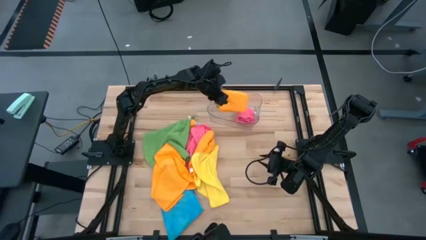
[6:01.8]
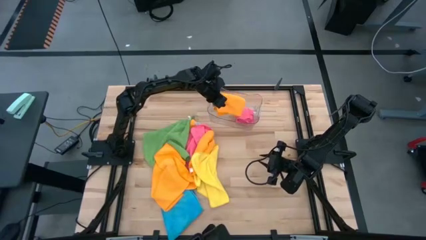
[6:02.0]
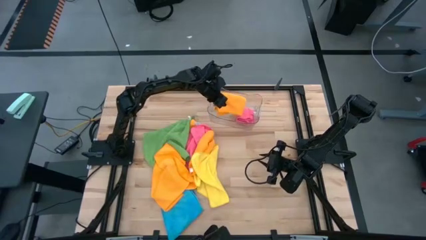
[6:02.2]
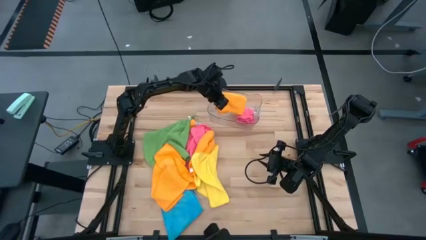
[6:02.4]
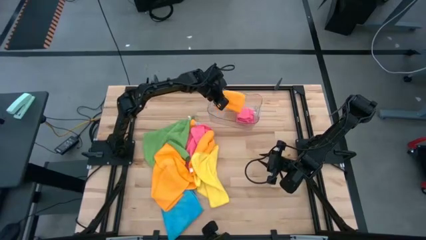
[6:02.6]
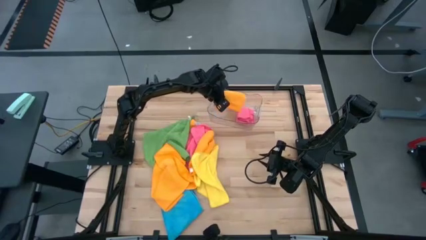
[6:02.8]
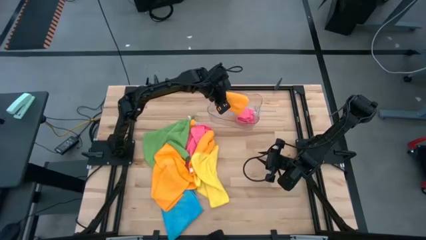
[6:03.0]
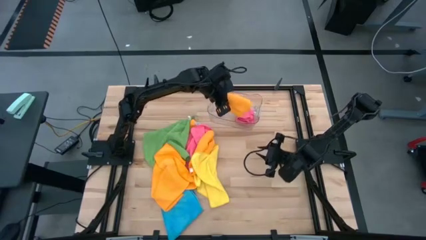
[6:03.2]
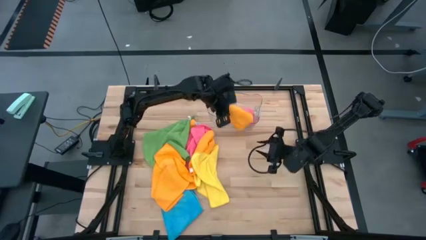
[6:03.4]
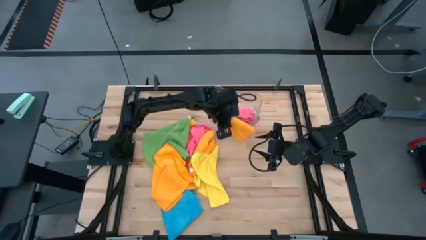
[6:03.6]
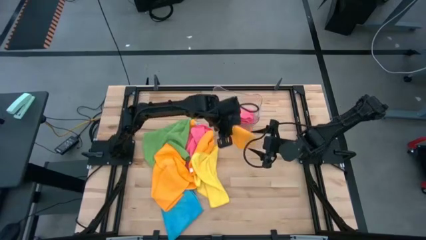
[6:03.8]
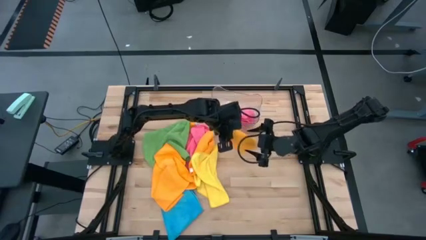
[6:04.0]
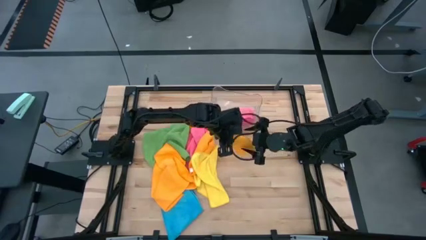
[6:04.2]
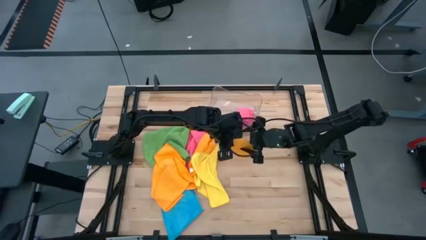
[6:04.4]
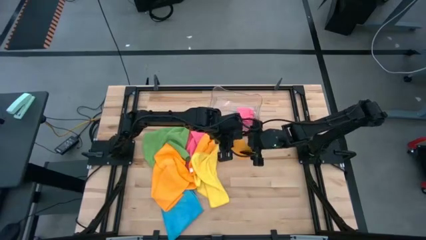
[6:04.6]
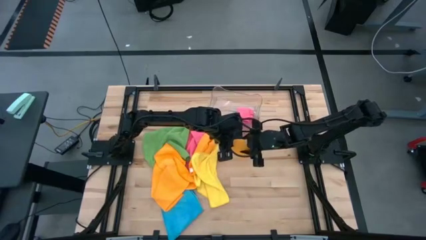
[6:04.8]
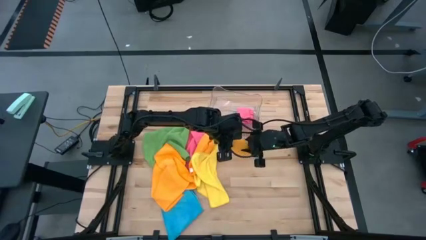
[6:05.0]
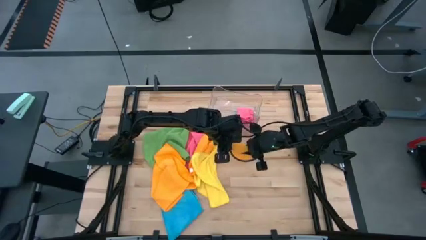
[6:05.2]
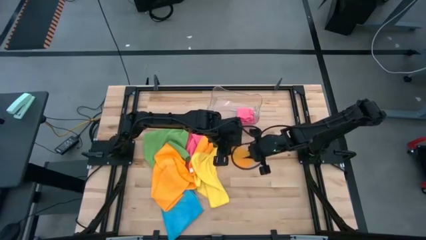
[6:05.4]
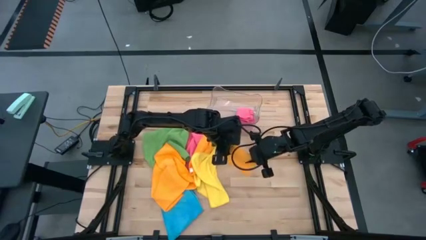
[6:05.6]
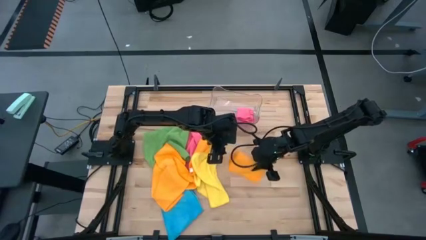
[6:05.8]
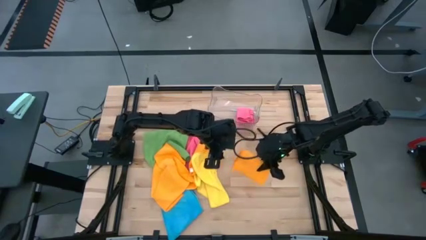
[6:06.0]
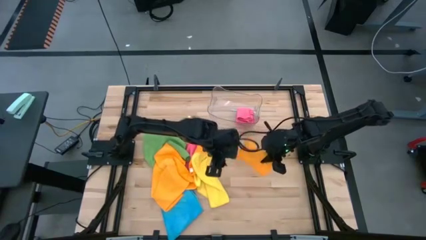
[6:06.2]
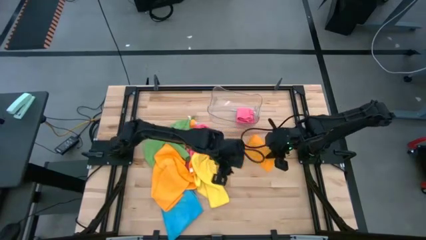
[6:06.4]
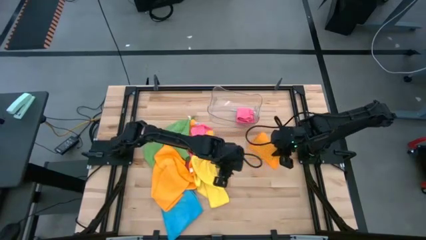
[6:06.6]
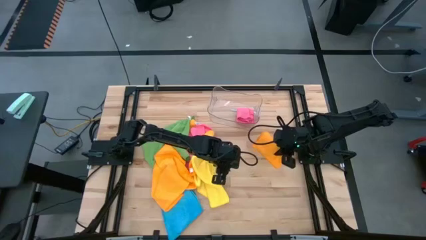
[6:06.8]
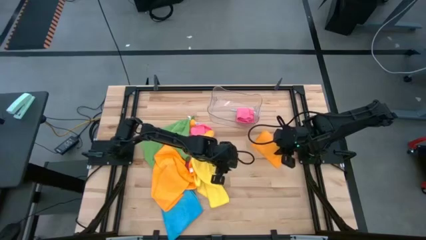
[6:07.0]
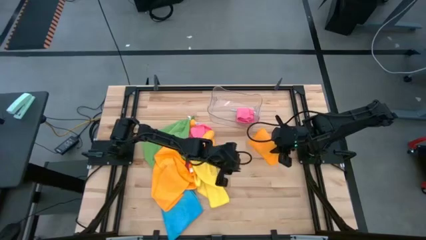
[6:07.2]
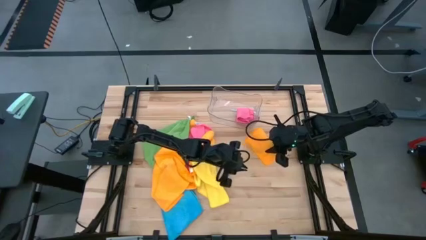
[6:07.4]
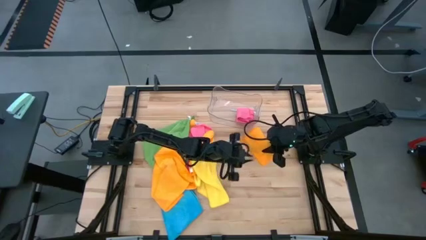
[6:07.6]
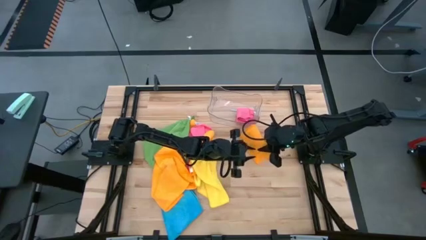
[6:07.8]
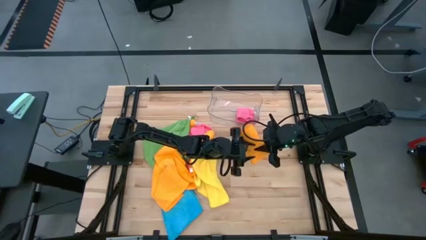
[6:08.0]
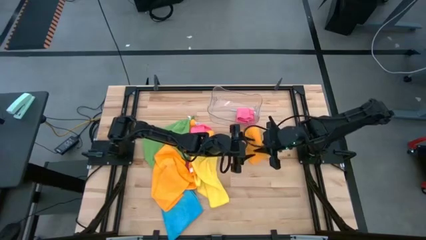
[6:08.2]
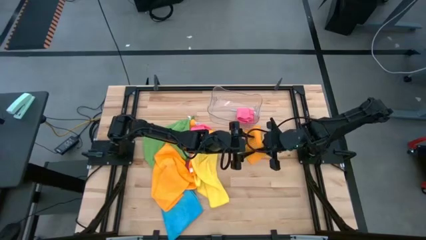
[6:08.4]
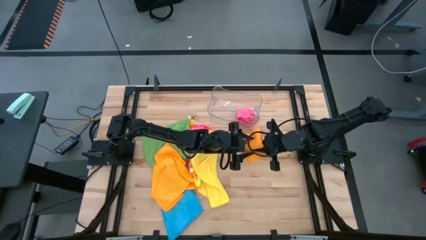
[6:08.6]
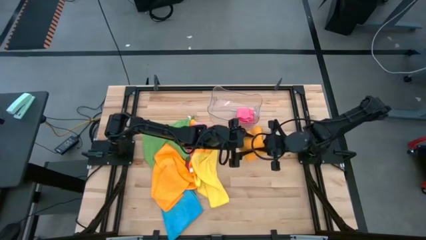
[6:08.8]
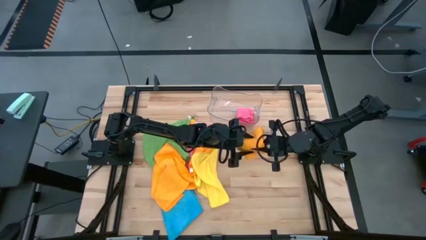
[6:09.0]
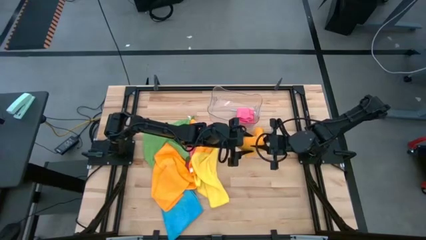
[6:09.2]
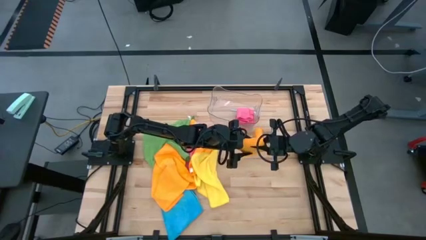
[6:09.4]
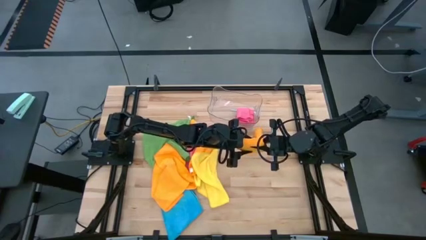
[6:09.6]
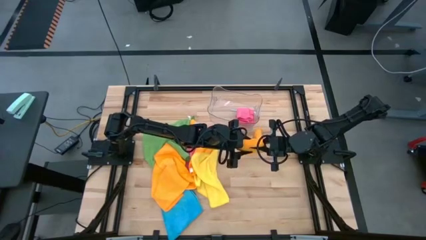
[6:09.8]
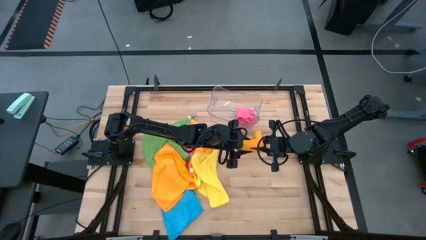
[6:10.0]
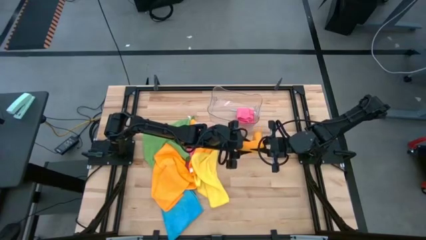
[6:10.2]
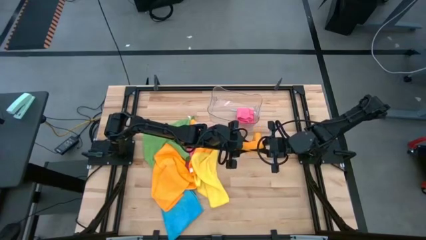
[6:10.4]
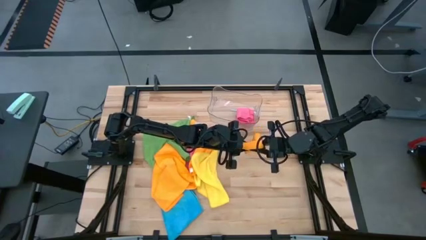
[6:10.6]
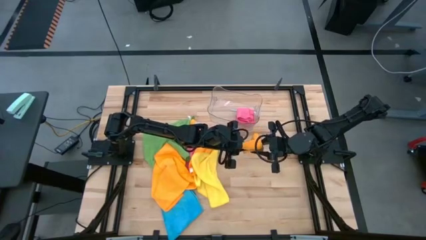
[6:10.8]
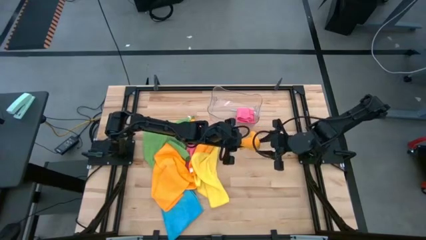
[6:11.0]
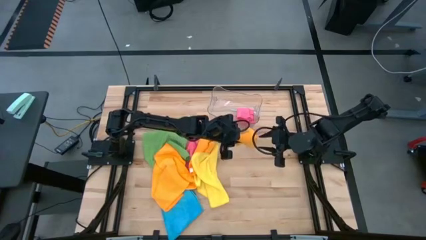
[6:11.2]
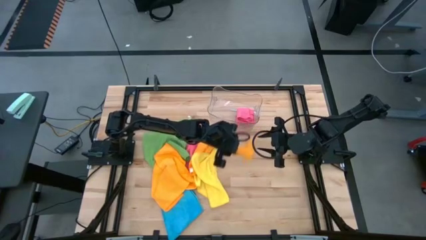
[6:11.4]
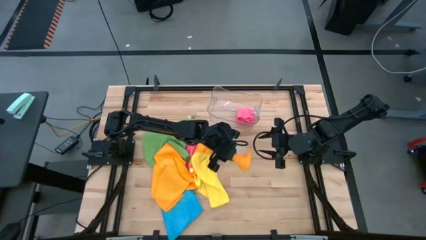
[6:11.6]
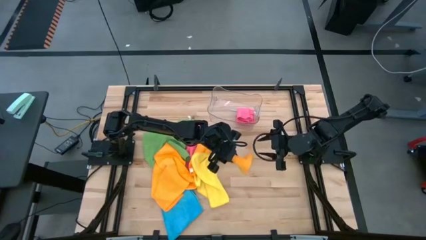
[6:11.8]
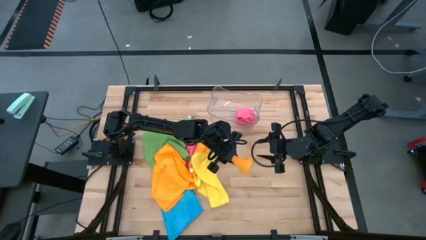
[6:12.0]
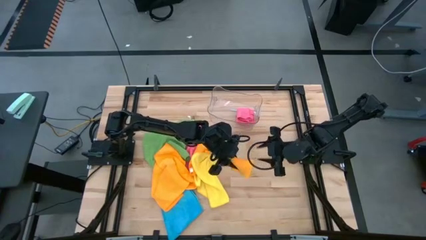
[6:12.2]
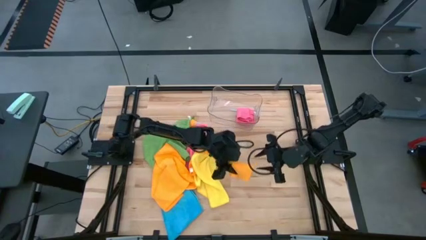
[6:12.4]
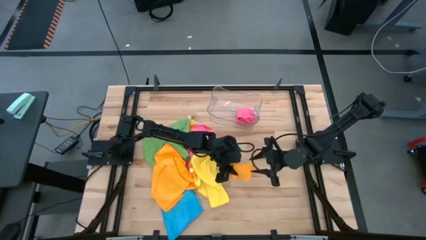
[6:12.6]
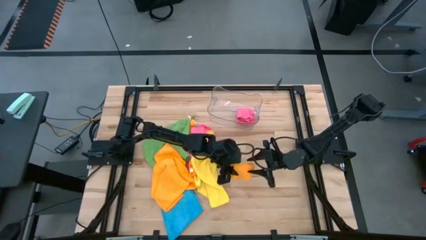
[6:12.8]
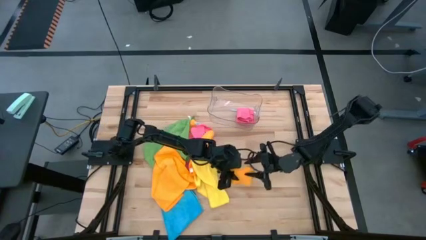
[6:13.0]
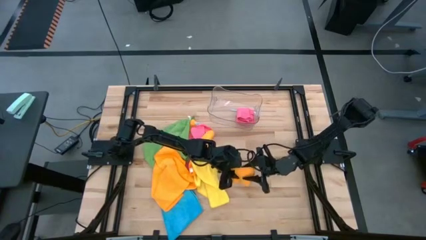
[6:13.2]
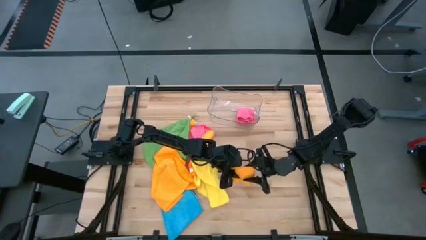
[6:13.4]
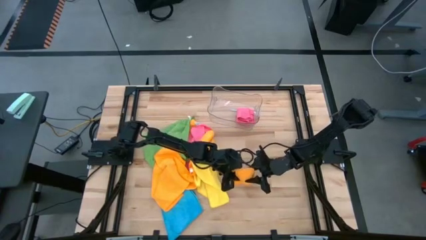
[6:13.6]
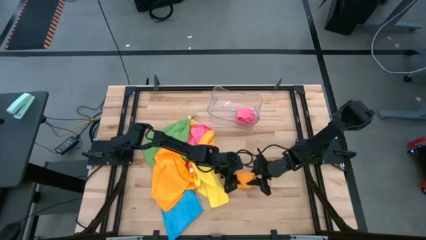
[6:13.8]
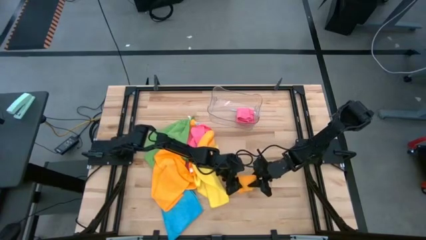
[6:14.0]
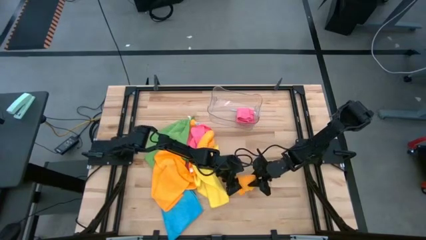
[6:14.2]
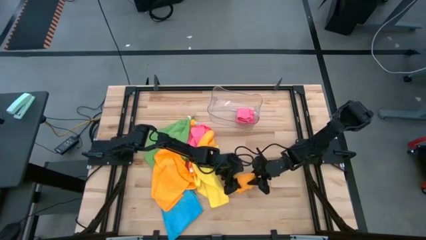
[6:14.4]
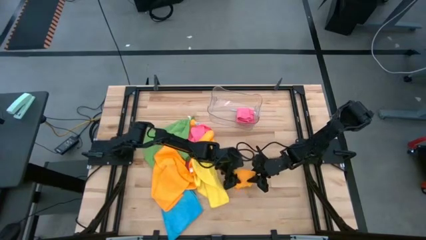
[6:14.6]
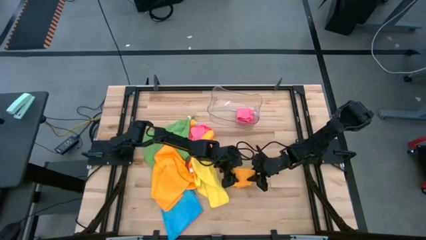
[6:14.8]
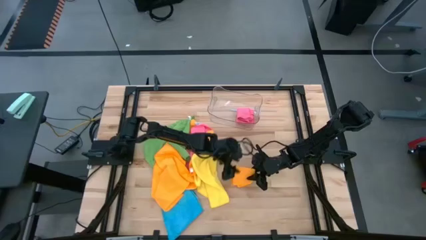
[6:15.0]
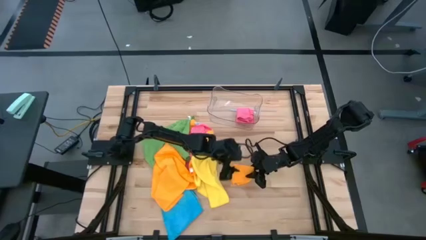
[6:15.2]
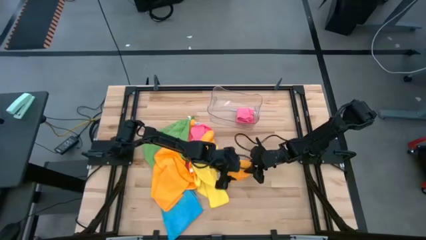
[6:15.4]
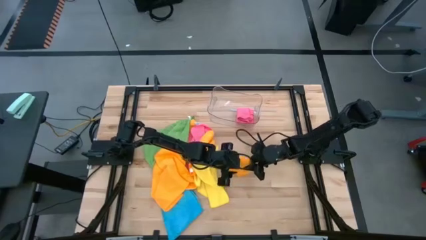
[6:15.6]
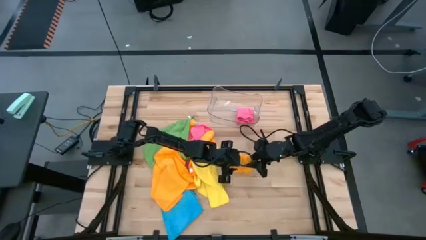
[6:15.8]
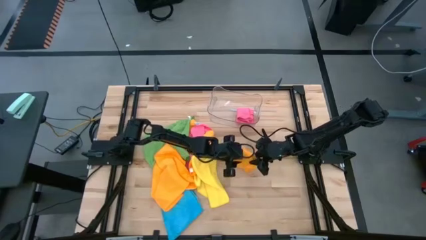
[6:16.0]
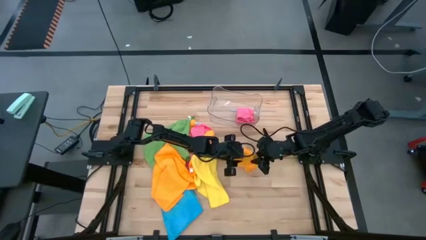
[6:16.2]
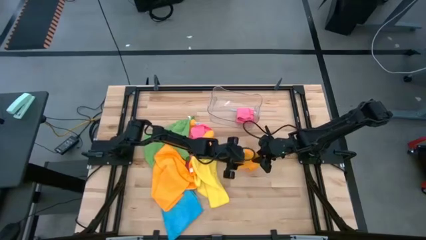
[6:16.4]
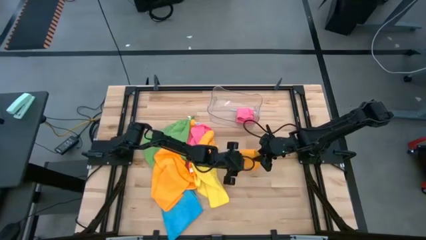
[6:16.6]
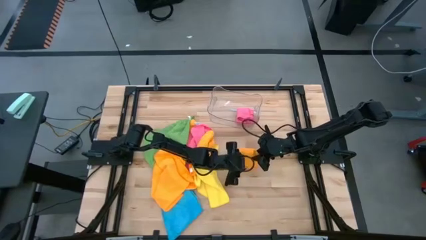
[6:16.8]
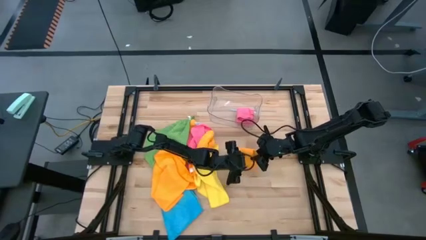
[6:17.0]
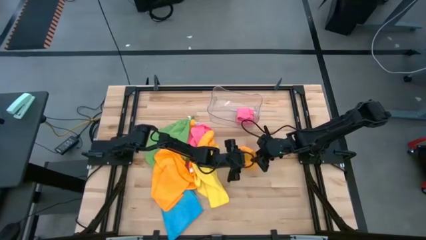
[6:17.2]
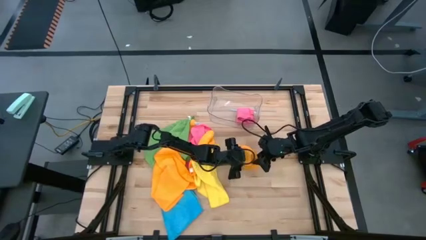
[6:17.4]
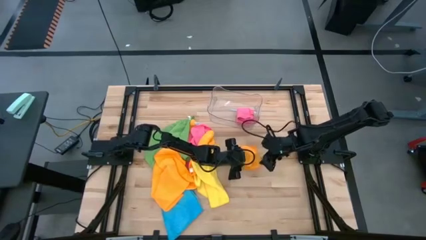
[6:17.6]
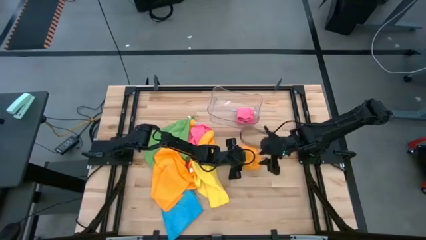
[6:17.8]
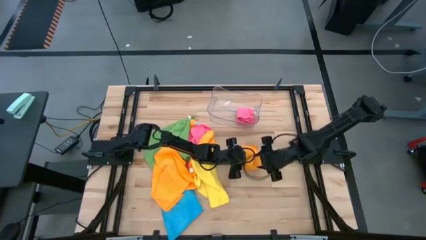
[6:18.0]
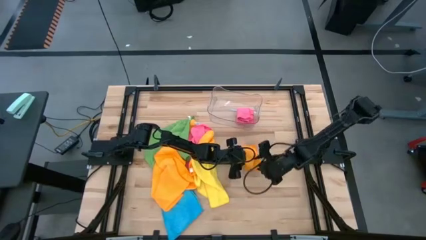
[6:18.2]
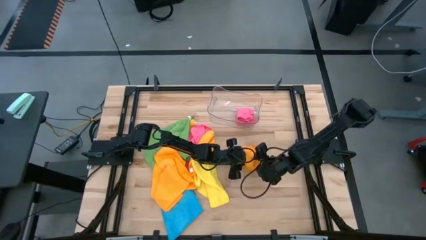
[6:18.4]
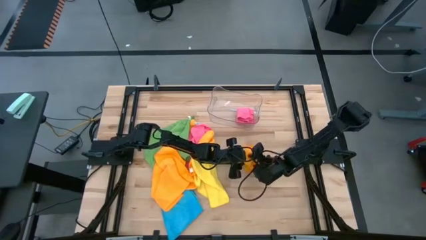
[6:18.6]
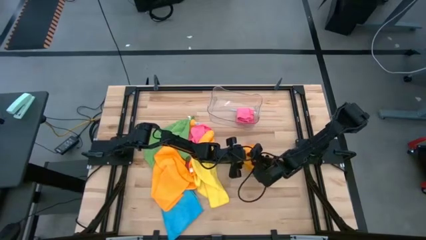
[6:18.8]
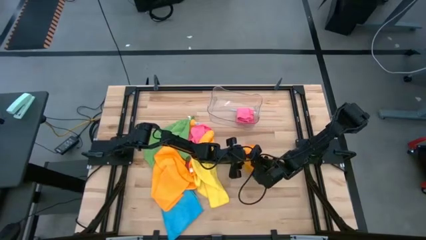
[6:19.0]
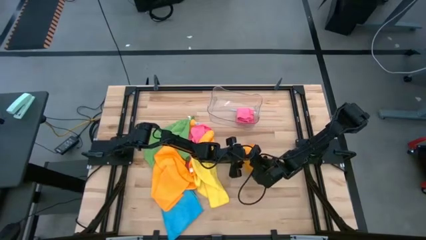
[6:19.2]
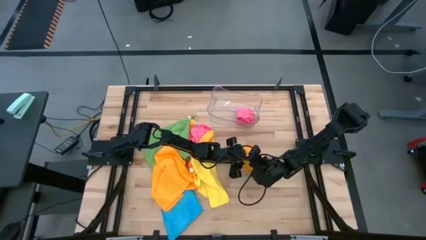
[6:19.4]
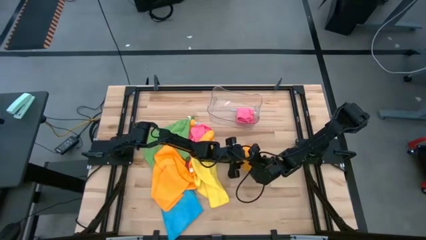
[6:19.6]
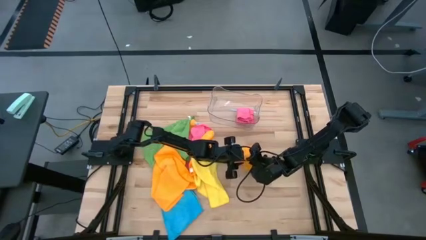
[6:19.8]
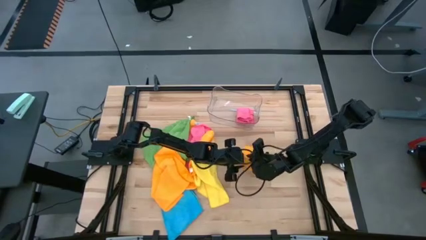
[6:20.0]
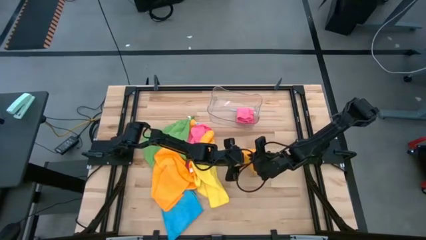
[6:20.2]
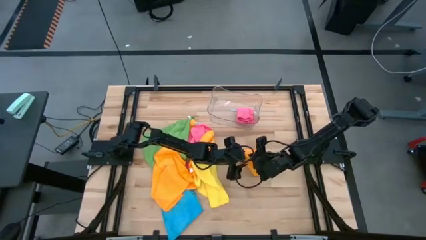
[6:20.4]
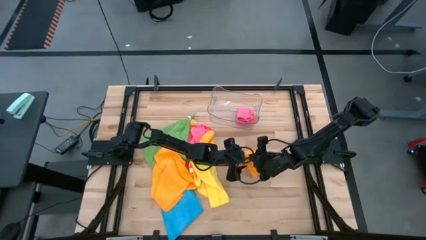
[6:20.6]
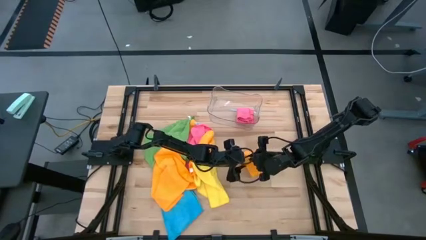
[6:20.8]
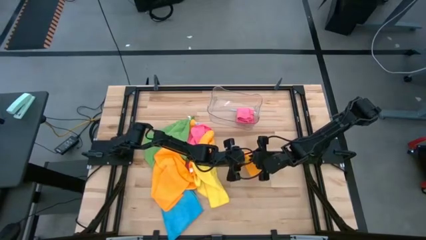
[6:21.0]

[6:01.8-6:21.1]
Task: Fold microfiber towels
Fold the right orange microfiber cloth
